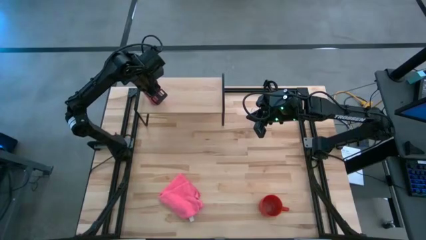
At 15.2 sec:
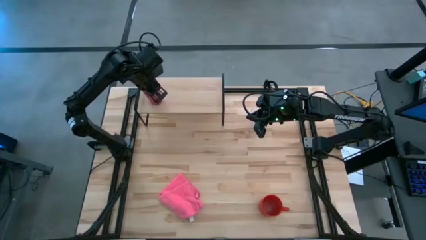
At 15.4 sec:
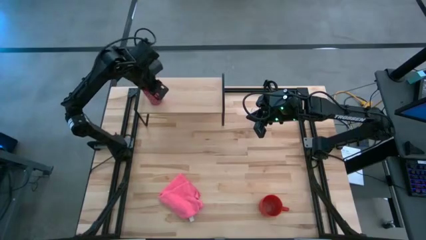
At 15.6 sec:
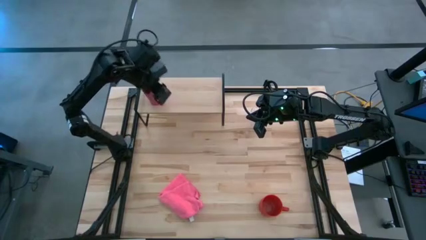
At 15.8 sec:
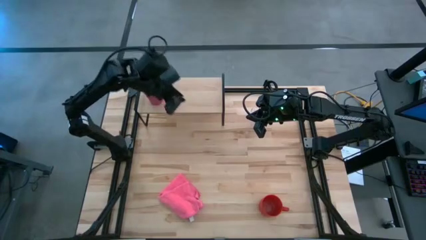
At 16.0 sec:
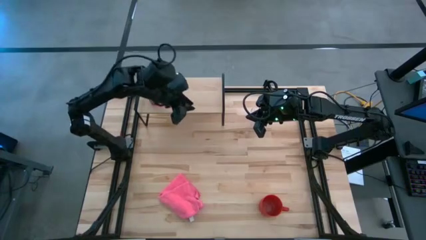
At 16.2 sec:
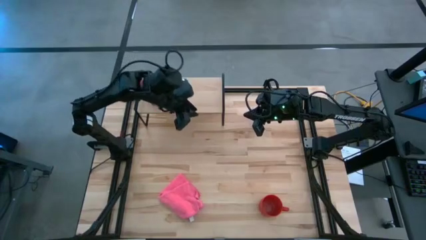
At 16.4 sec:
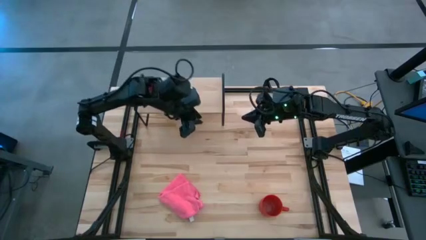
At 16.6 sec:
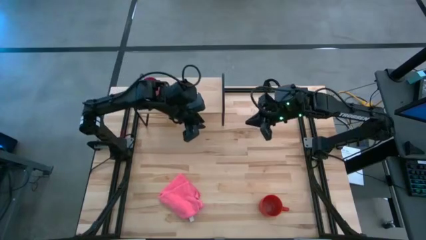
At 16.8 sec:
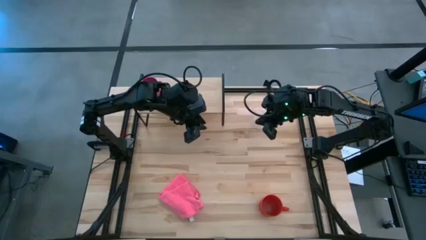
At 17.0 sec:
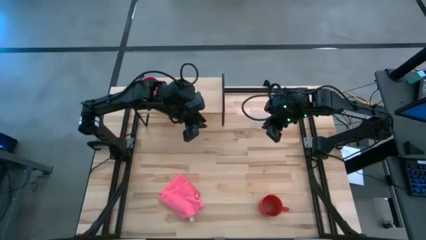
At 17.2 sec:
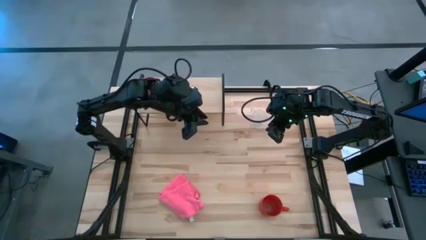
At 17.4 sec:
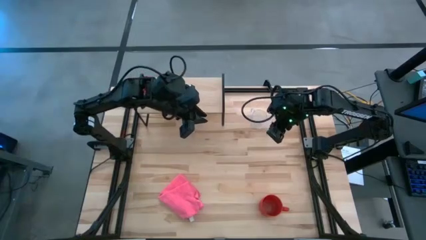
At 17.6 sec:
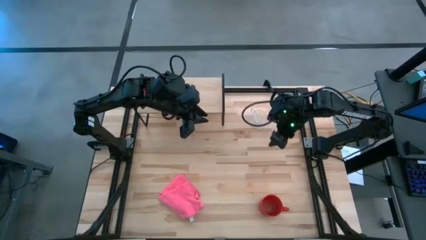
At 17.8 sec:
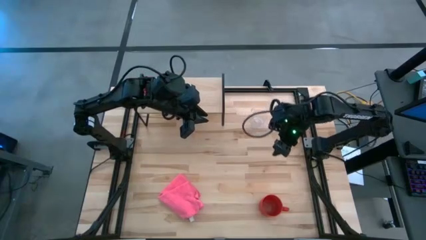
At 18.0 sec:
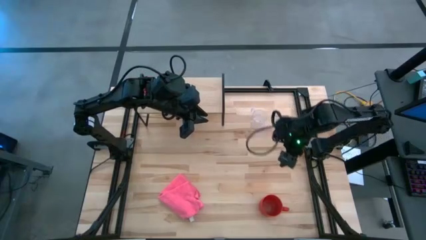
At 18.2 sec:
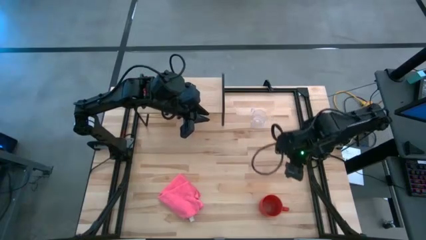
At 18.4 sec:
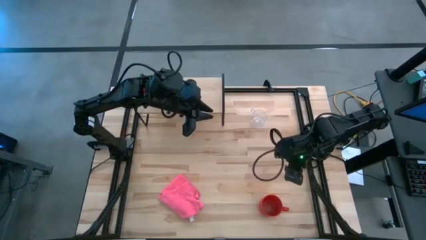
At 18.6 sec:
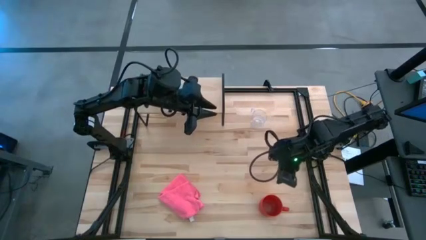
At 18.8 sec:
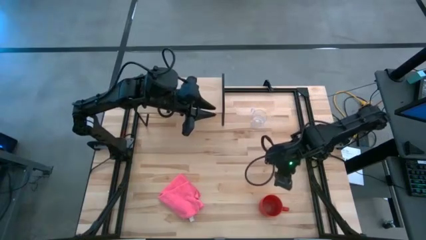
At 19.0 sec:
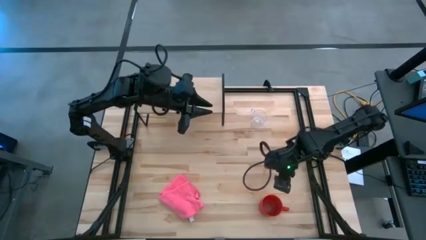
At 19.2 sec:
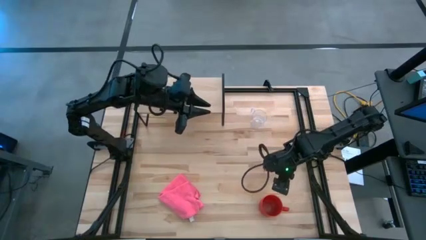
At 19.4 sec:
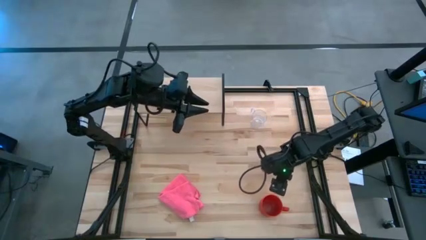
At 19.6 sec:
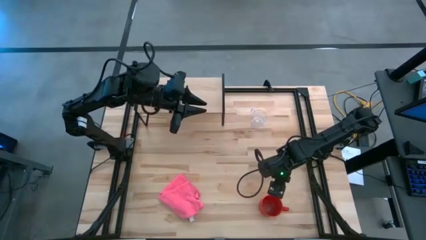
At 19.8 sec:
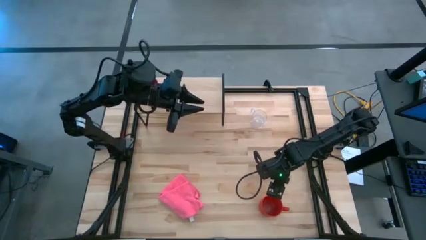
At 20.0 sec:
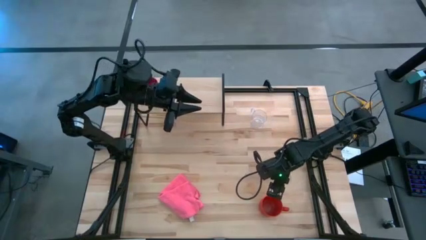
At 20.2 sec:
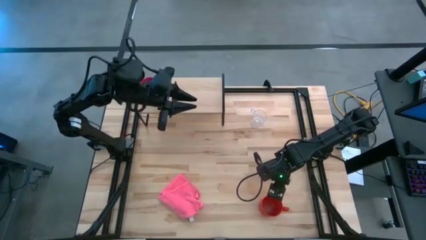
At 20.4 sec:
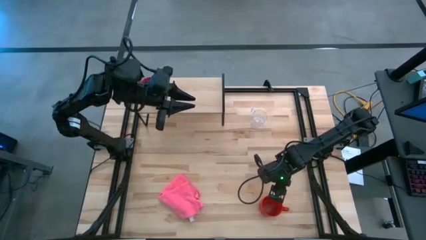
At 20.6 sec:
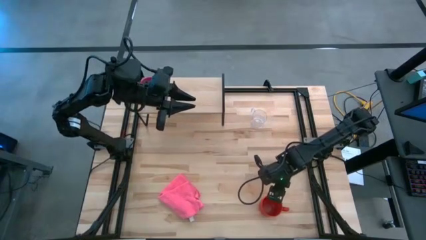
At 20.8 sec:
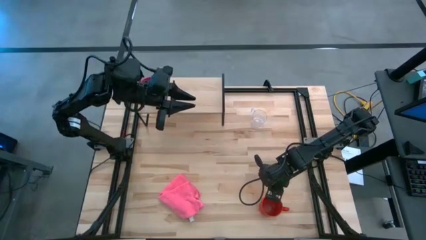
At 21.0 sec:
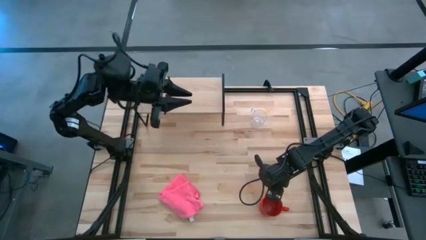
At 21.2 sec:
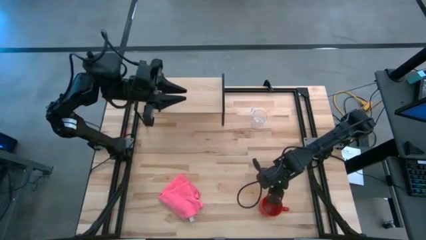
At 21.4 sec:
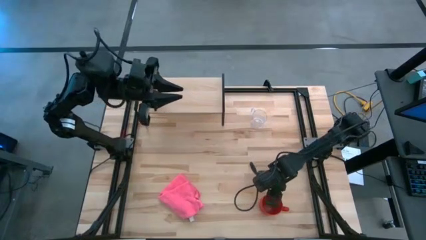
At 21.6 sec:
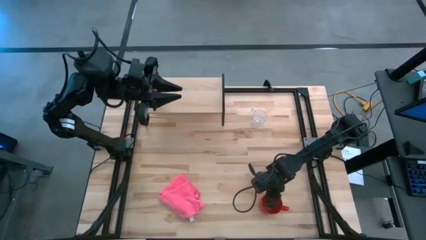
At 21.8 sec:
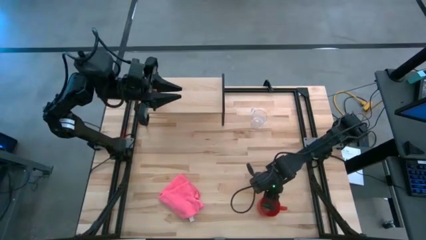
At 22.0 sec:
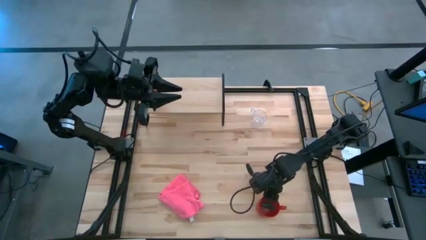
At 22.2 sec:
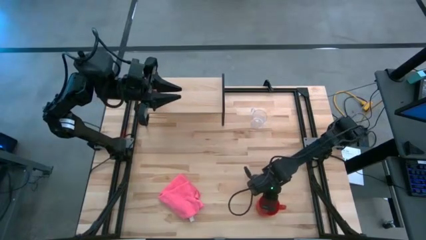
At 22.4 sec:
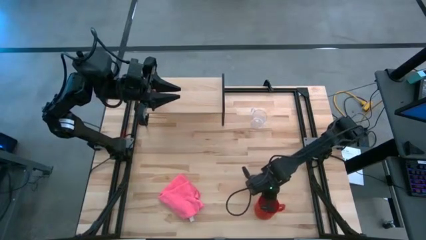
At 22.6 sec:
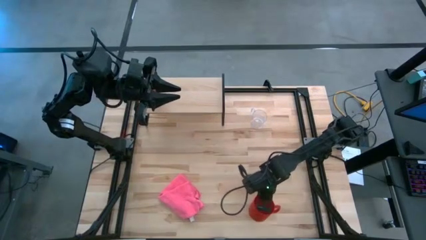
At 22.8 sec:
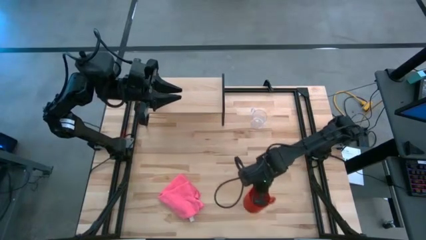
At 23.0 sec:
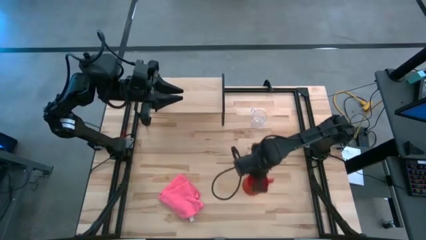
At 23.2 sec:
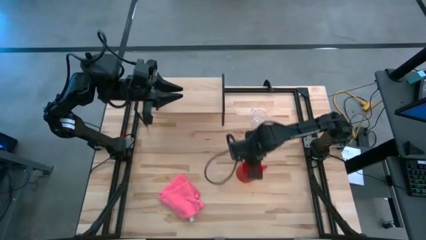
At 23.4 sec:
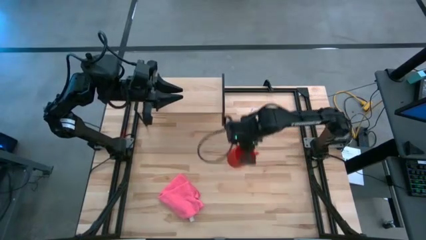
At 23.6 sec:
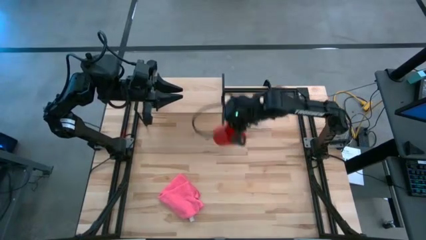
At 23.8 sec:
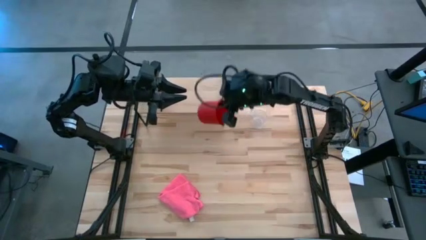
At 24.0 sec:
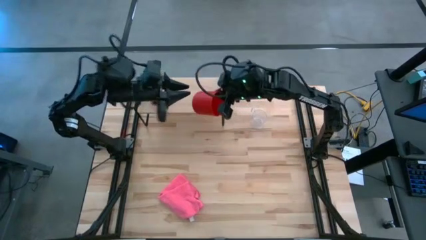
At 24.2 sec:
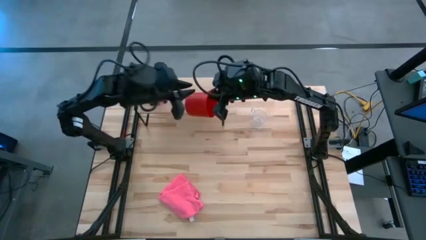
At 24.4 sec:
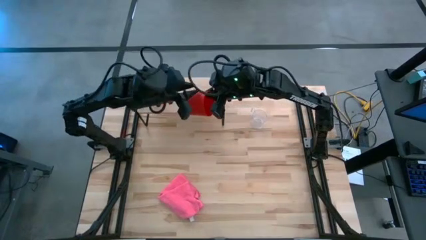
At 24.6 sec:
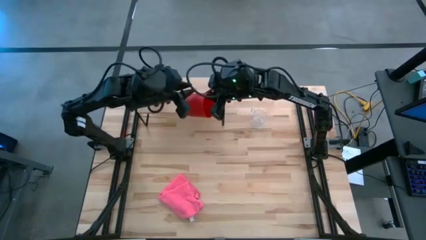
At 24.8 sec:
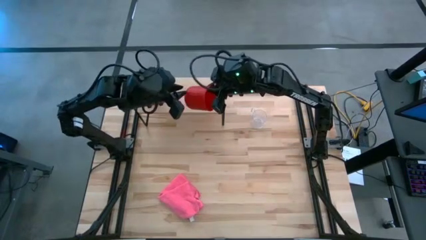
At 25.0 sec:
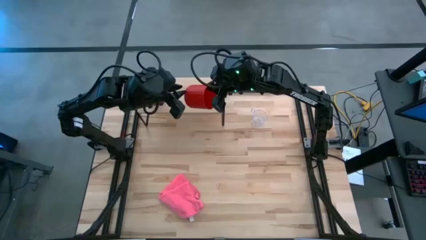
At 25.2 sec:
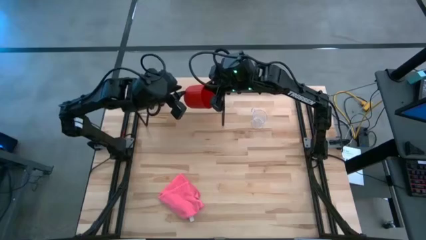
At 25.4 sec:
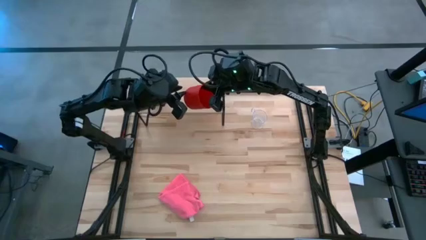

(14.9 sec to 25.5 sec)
Task: Stack small to large cups/mugs on shelf
Put the red mug on the shelf

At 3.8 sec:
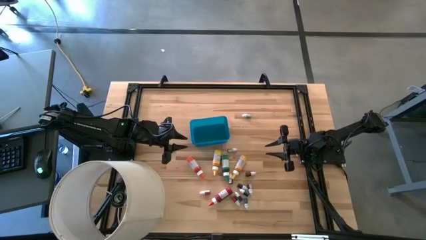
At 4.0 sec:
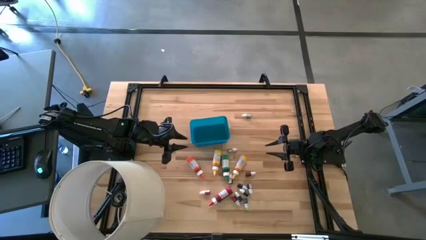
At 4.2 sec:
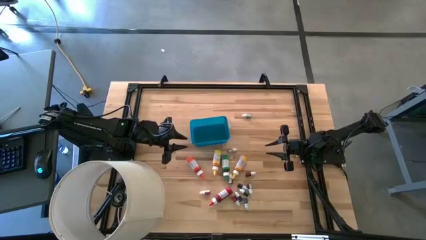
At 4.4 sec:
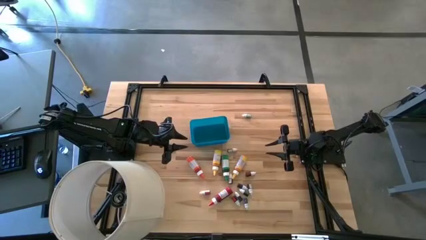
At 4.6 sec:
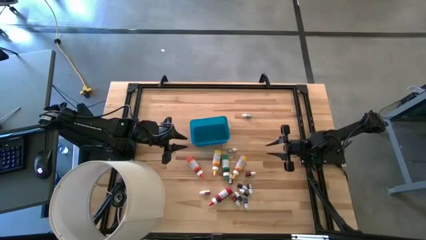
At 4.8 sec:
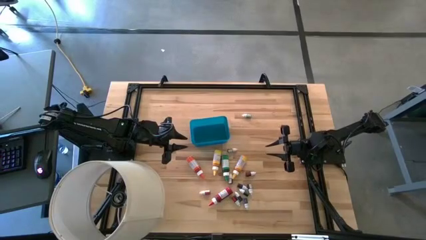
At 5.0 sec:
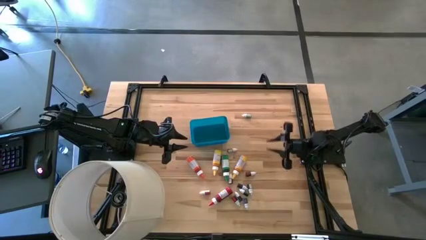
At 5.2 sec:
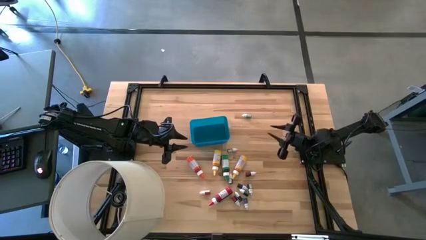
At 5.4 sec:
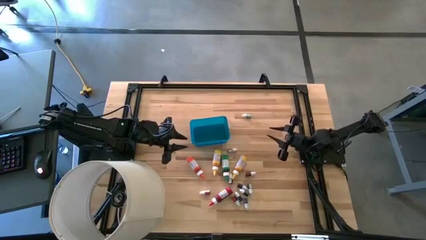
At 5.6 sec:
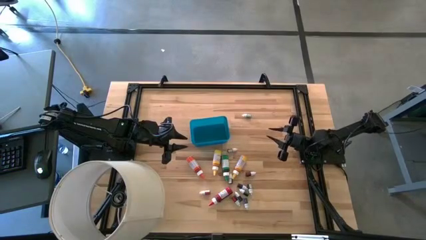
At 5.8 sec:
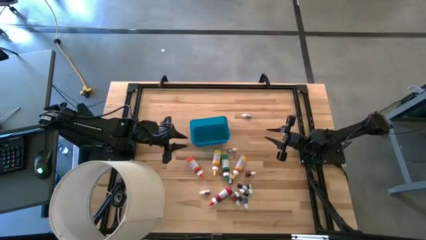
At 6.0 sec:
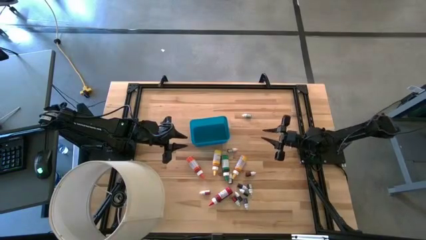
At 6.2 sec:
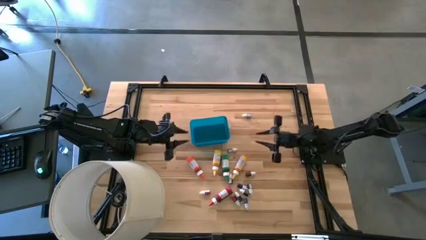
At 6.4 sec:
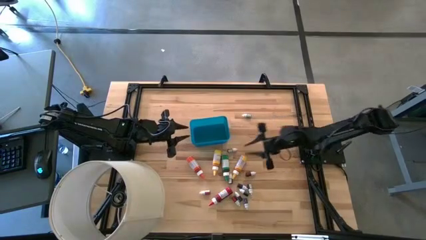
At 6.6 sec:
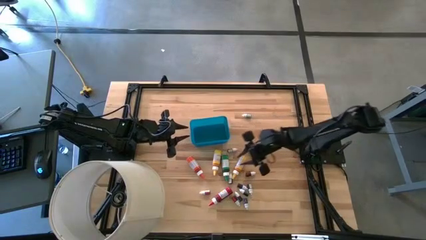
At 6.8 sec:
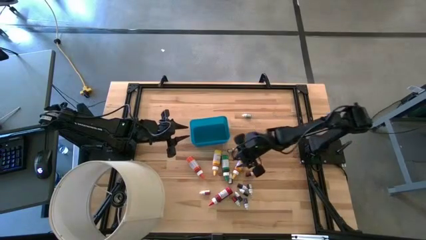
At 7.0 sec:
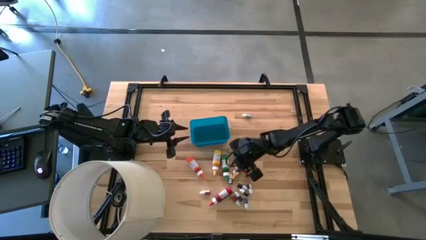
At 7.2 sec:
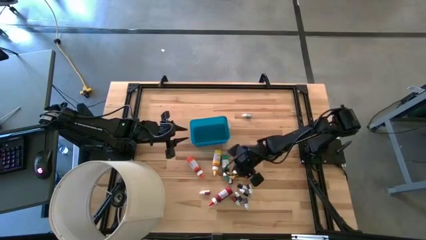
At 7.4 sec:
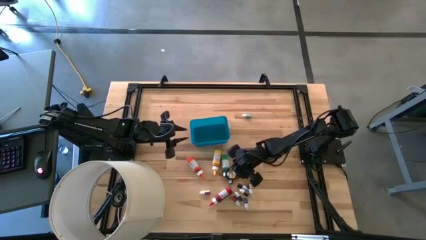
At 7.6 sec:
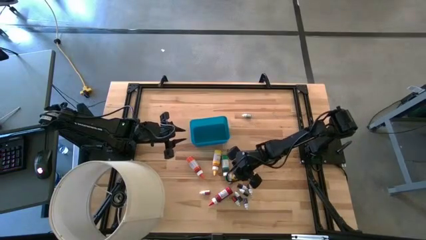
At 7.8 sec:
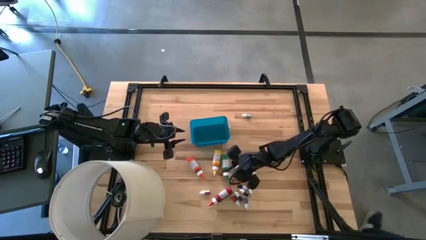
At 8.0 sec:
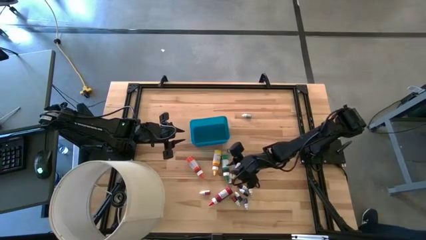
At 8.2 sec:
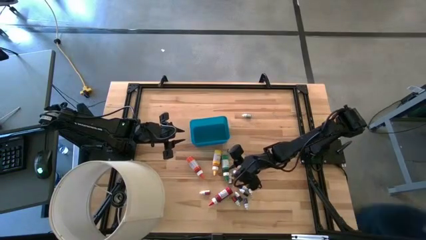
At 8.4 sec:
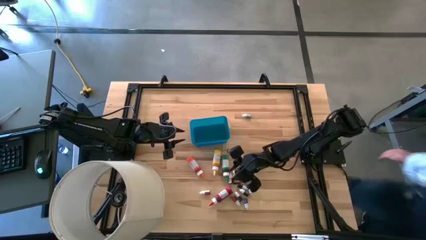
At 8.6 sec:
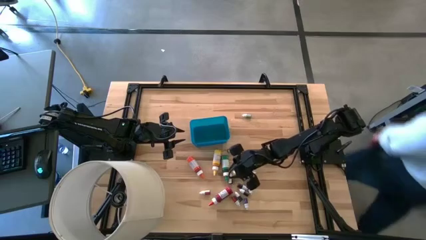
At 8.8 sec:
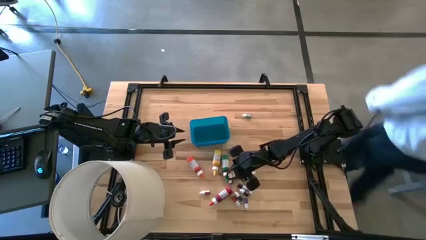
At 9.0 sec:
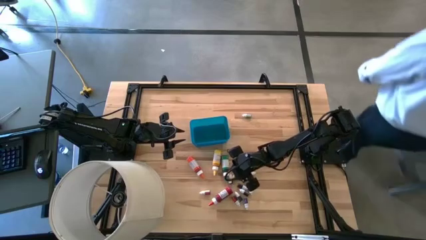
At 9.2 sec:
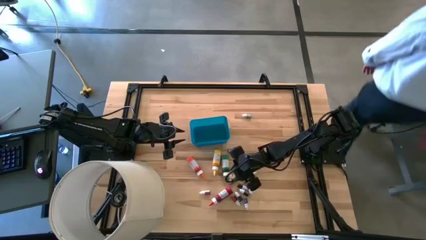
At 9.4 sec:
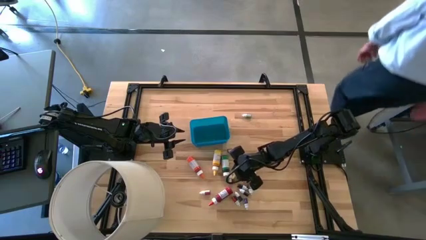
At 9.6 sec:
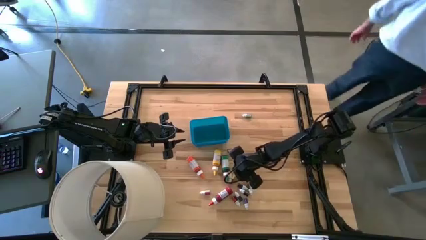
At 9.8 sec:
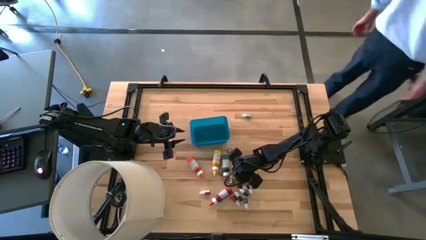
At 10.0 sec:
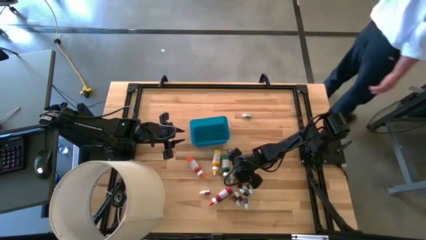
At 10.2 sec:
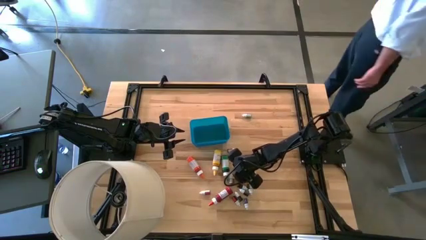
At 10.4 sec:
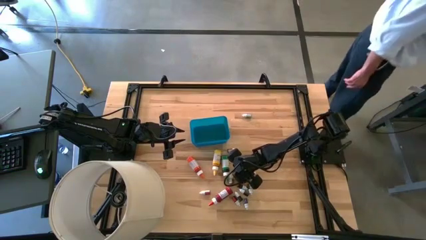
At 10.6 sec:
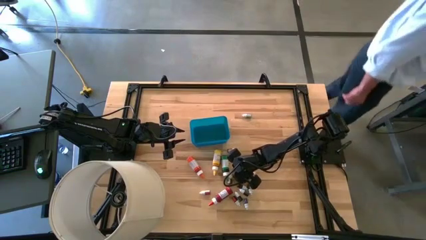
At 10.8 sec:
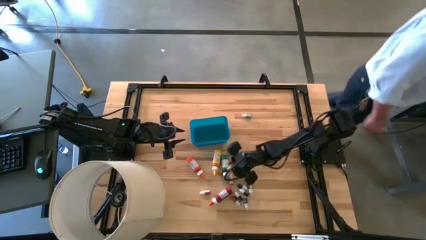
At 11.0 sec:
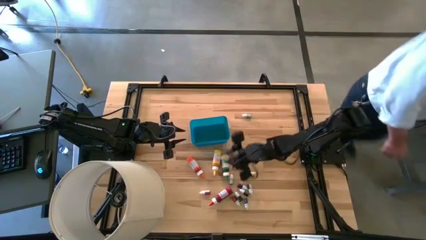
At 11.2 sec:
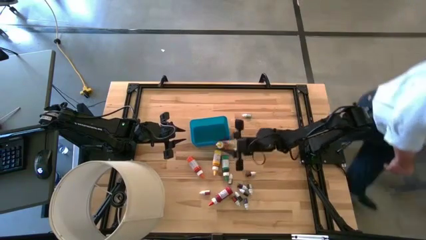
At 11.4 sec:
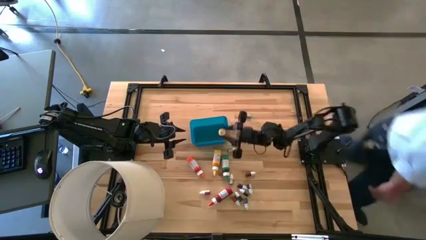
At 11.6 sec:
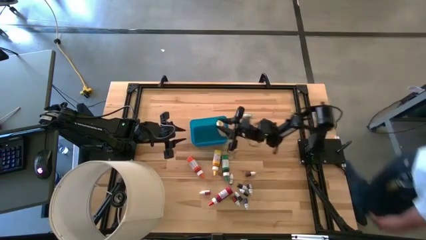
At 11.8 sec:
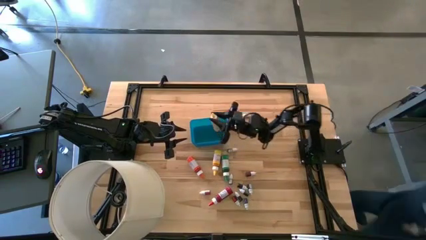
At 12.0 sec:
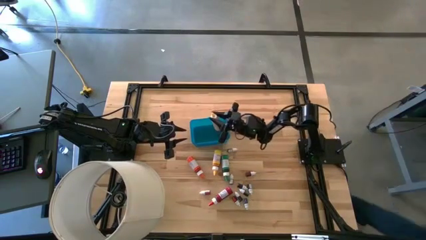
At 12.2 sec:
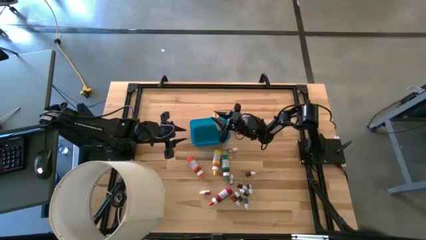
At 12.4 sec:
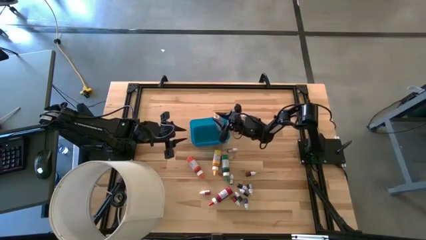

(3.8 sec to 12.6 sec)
Task: Pick & Place food coloring
Put the big right yellow food coloring bottle into the bin
